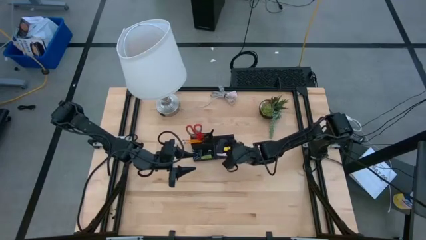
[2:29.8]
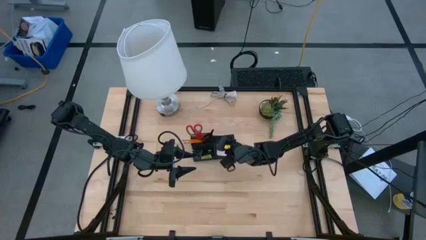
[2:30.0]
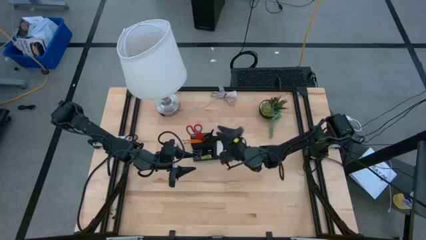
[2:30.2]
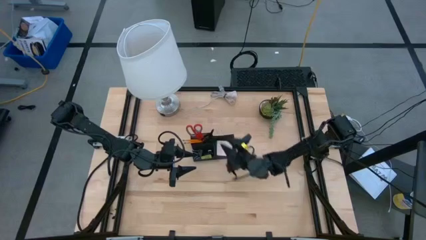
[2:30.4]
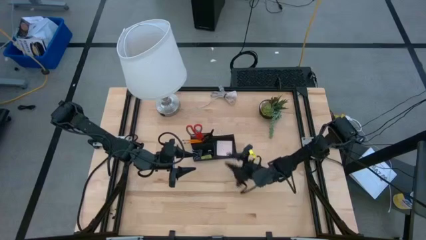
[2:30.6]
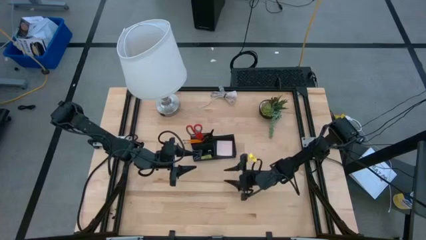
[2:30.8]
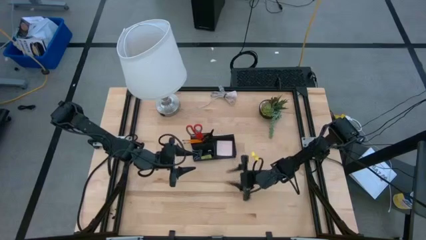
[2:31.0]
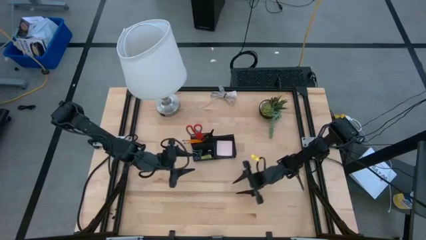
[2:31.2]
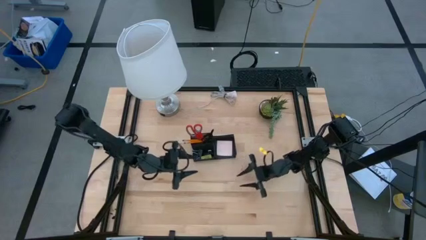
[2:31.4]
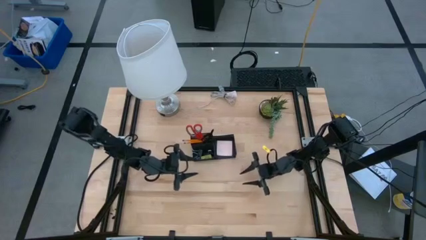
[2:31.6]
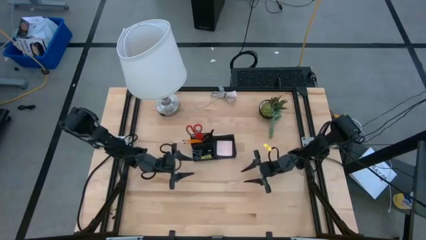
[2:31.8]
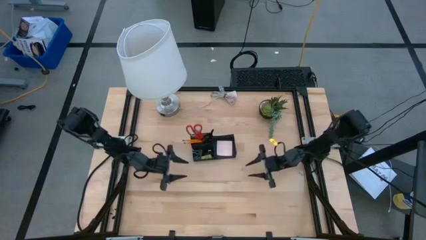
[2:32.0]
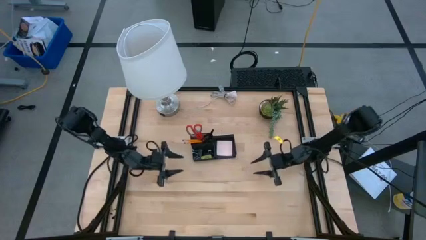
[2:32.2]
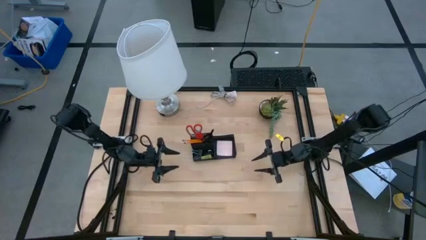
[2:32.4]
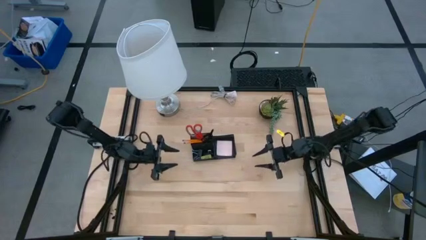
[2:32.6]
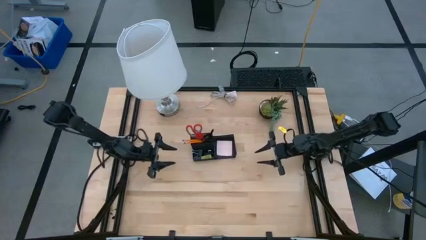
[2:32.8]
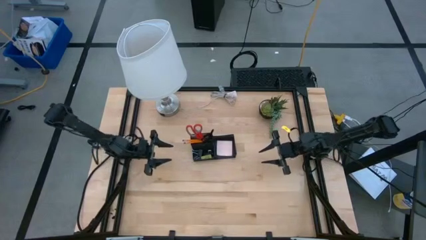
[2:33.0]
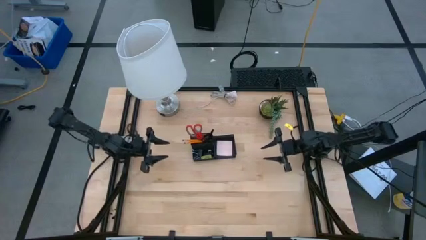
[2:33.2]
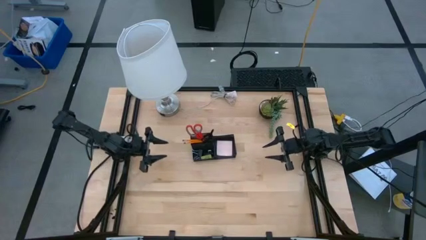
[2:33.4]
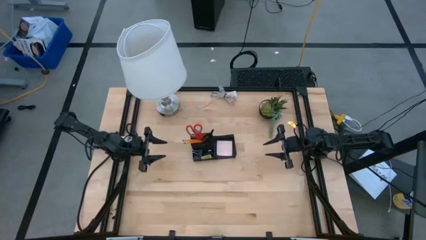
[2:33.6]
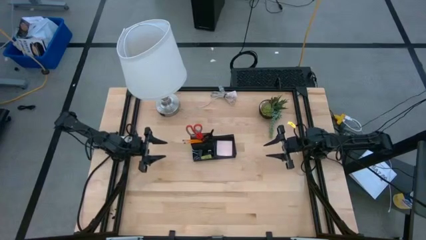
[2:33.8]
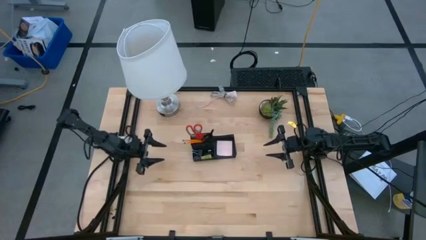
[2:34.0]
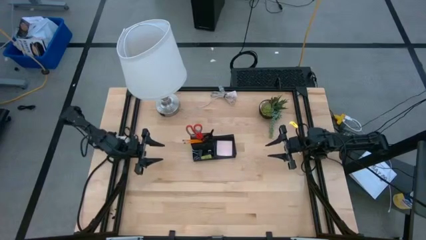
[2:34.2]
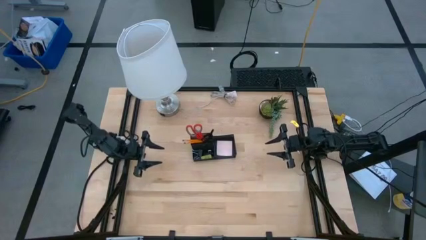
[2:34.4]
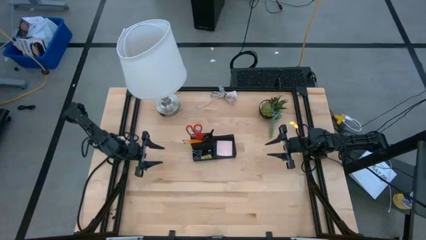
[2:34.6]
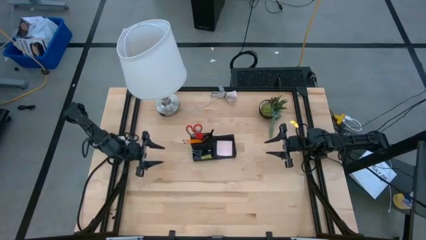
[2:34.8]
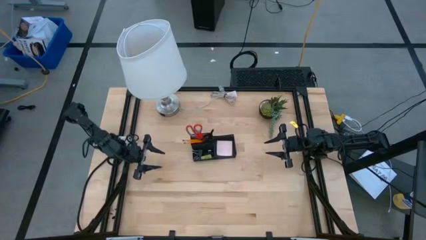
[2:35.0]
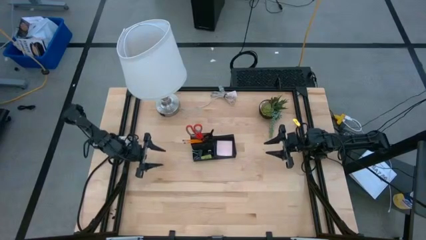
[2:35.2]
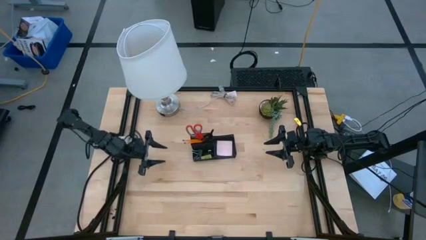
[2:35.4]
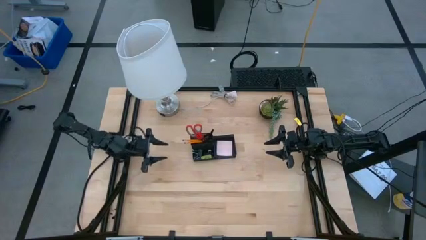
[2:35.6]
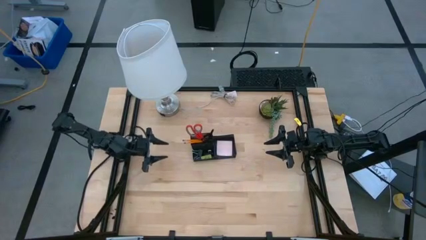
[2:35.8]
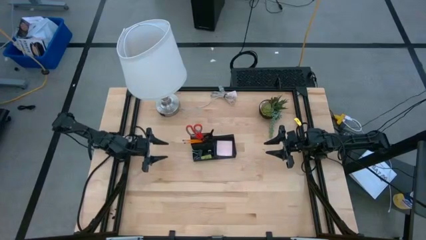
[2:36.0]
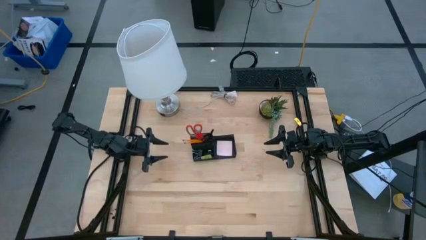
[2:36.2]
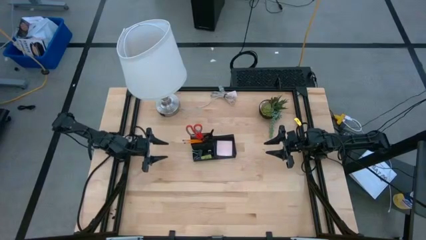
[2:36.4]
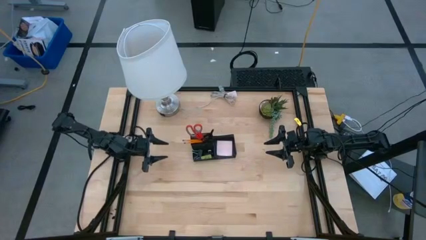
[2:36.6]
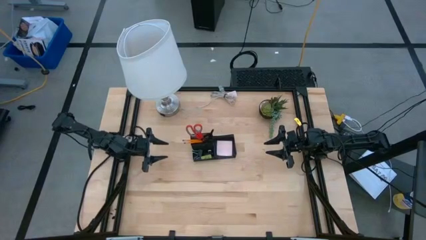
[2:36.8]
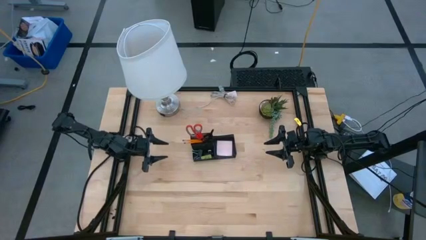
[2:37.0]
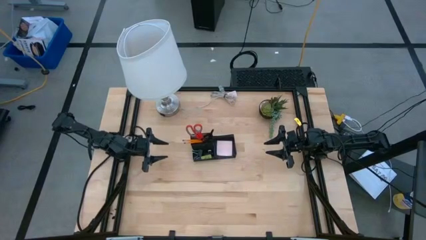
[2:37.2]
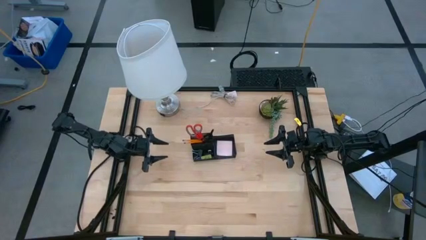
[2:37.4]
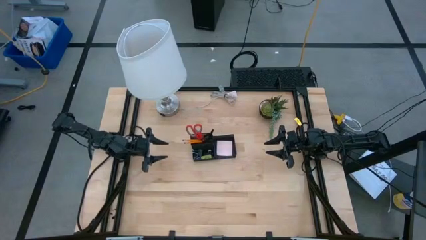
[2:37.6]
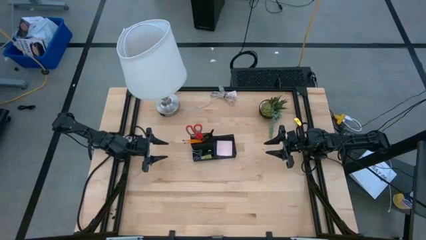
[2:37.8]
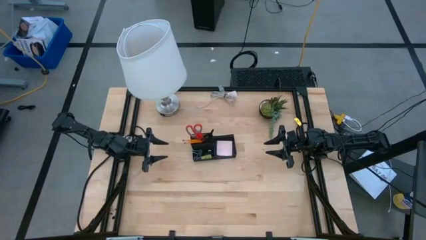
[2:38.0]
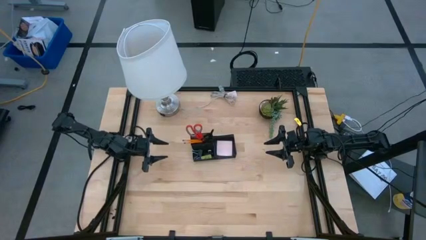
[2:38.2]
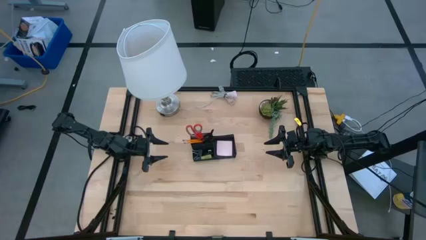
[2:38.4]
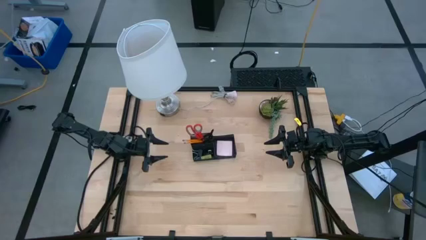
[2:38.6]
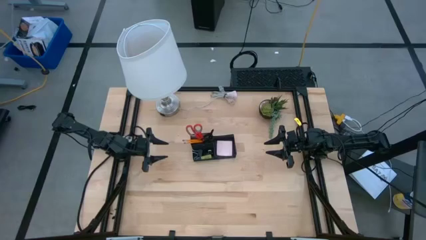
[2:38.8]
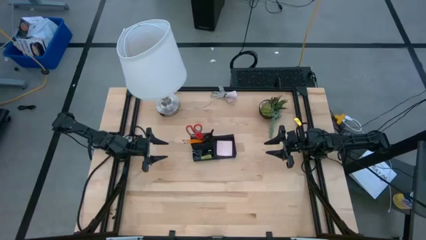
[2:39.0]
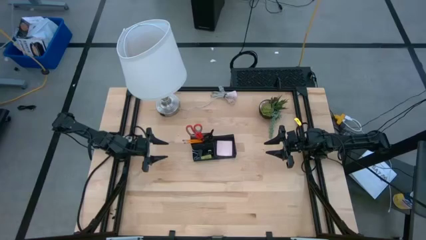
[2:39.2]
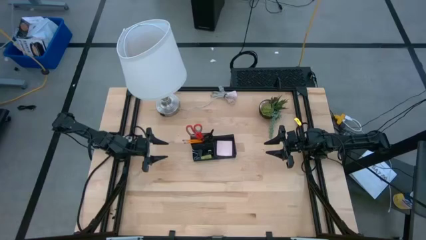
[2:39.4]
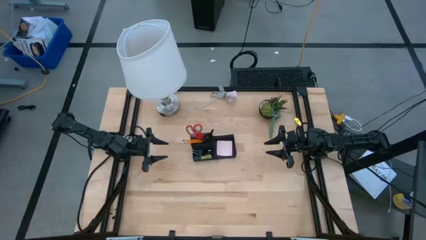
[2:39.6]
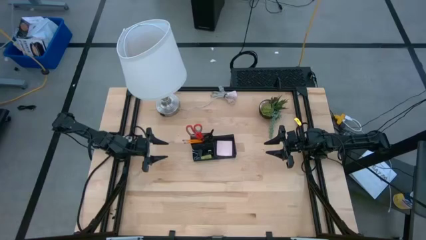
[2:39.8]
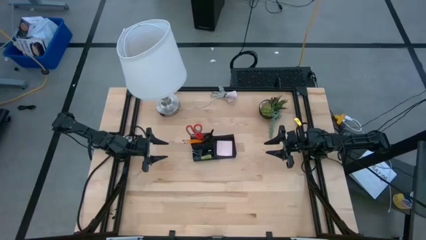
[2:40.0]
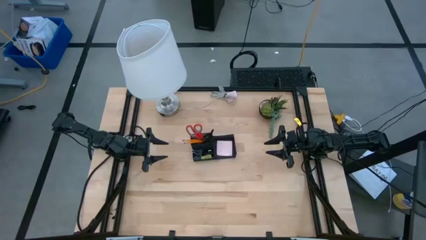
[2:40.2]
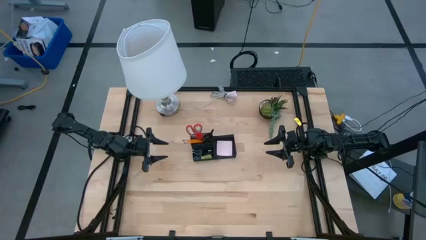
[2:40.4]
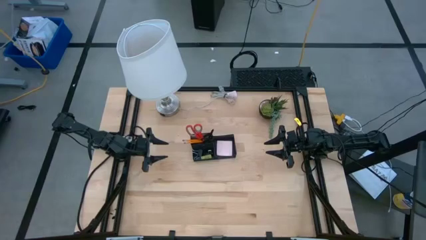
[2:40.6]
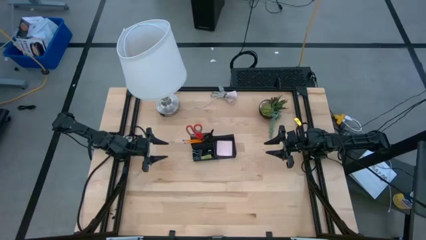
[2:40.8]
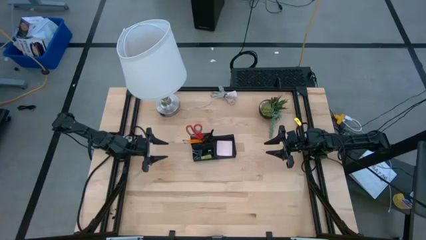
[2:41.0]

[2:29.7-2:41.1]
Task: Pick and place office supplies into organizer
Return to Home Position

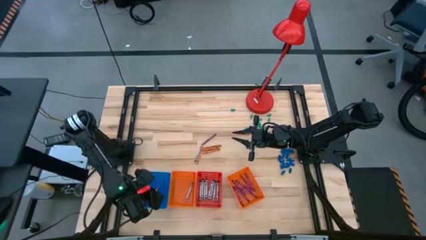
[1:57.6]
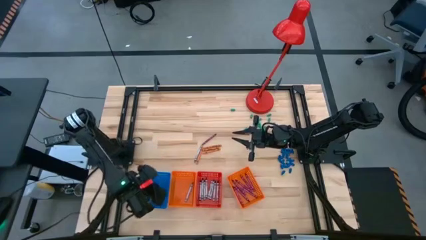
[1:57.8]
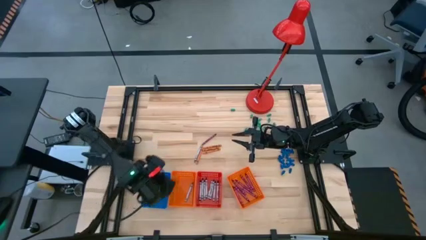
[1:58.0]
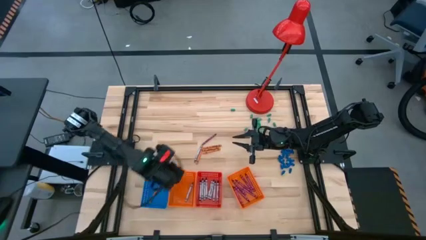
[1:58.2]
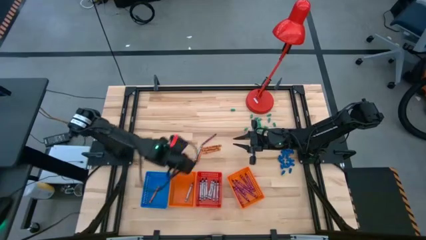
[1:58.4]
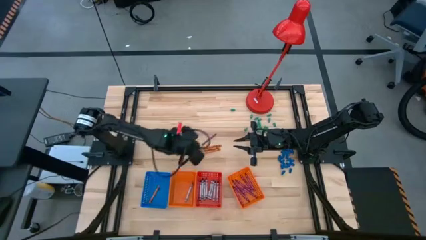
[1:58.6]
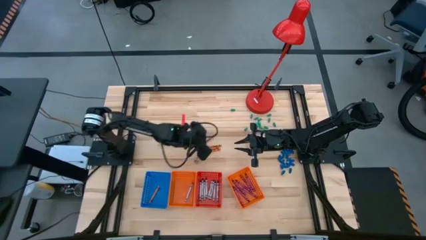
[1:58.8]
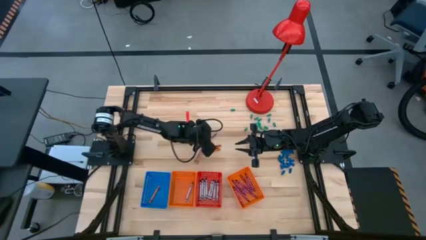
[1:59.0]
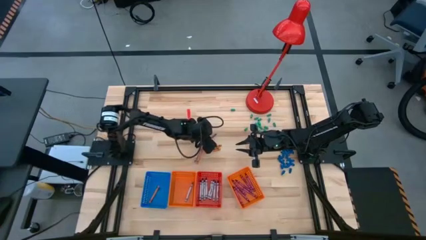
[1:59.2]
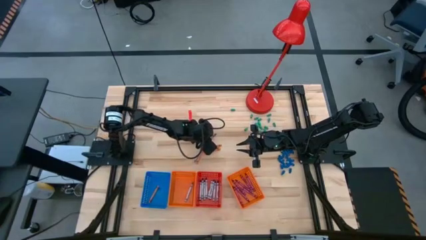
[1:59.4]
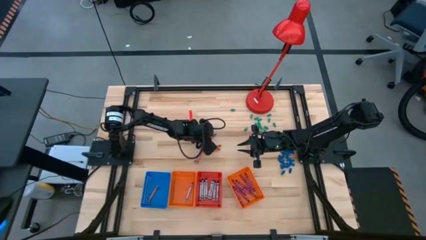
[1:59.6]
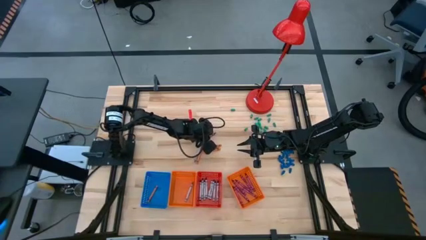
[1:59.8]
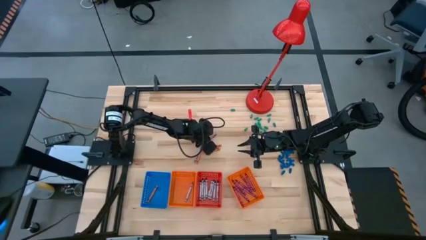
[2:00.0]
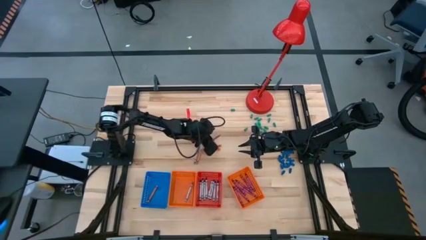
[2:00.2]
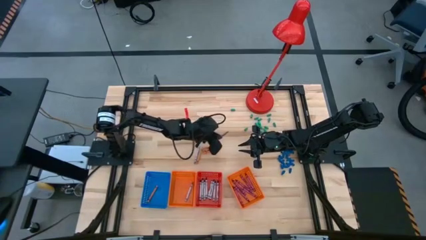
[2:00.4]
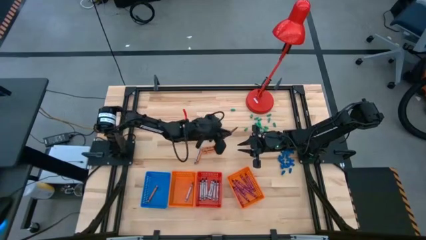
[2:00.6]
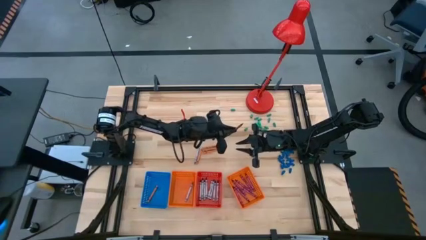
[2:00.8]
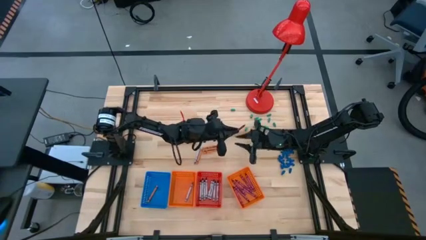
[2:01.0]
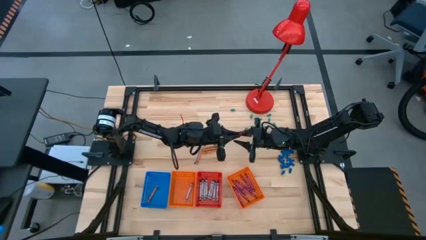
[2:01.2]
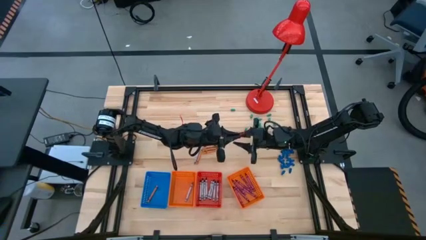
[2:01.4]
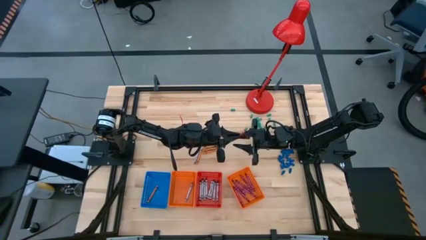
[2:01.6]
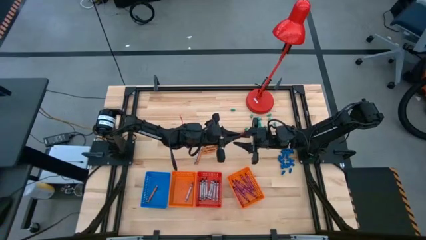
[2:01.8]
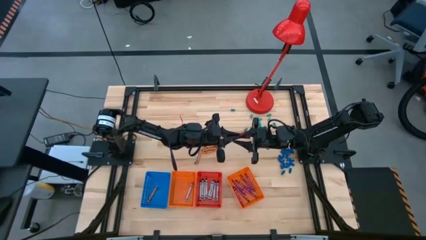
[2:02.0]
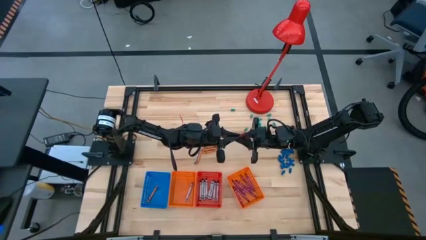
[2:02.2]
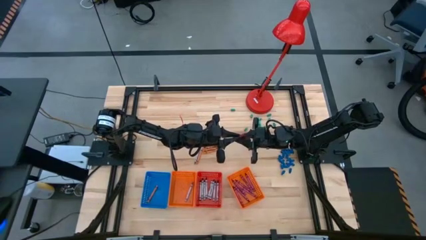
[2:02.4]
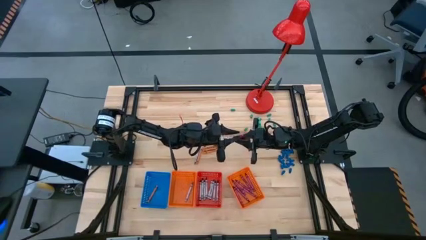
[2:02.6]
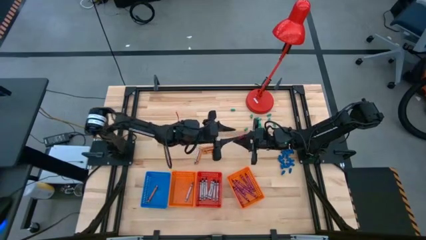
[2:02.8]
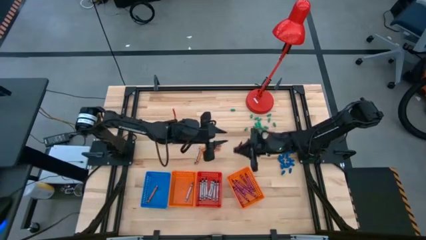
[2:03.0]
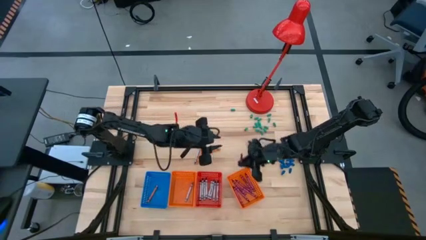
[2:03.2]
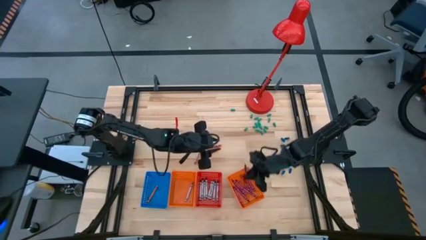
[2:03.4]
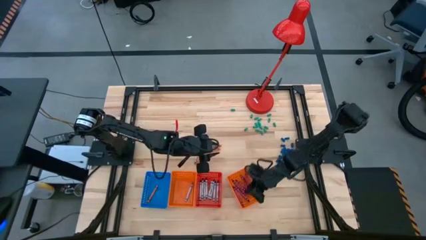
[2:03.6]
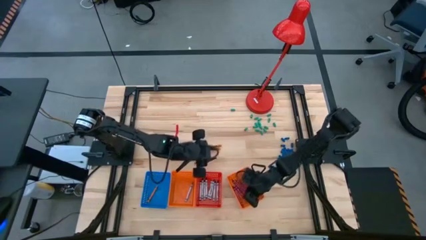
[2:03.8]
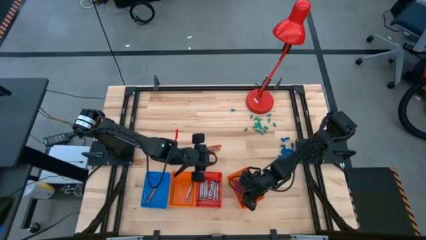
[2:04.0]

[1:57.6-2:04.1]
Task: Sort crayons
Put the red crayon into the right orange bin
